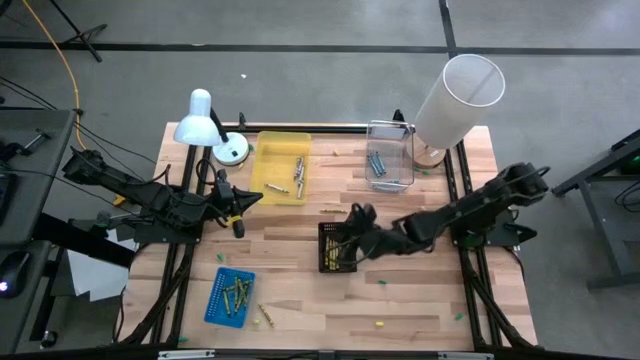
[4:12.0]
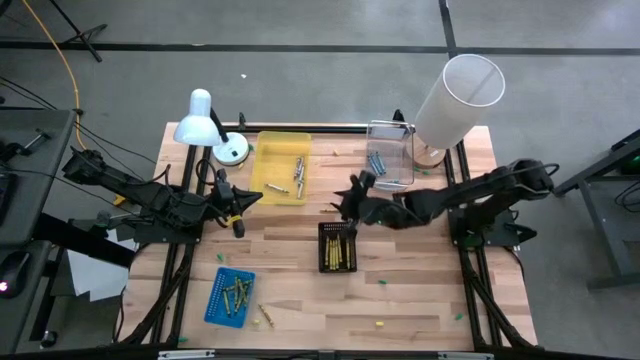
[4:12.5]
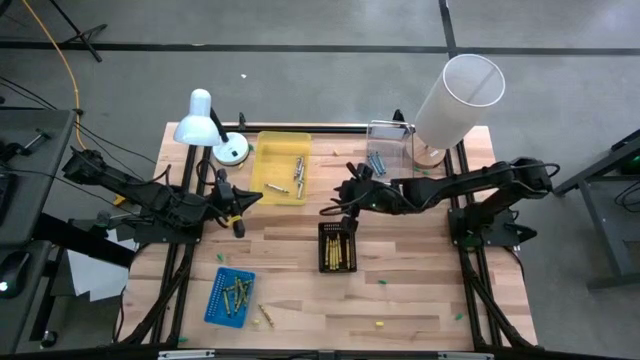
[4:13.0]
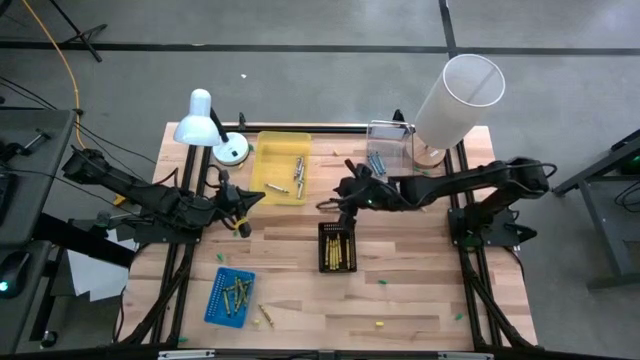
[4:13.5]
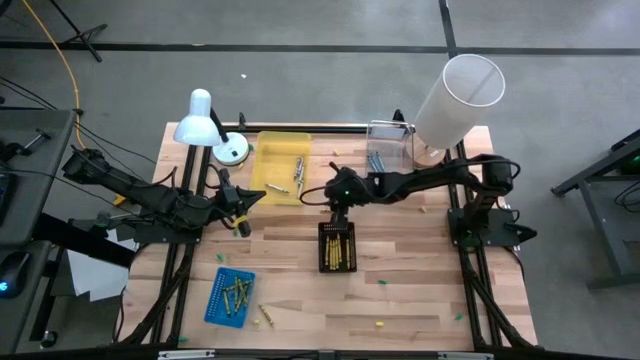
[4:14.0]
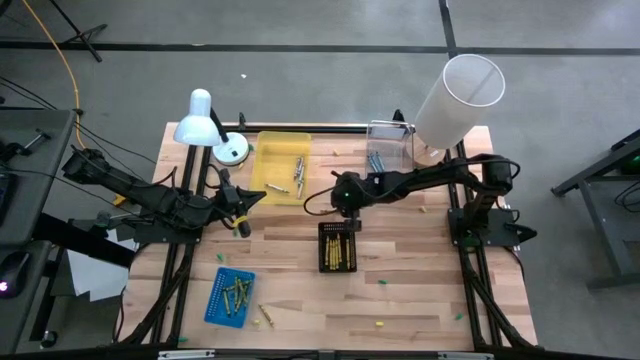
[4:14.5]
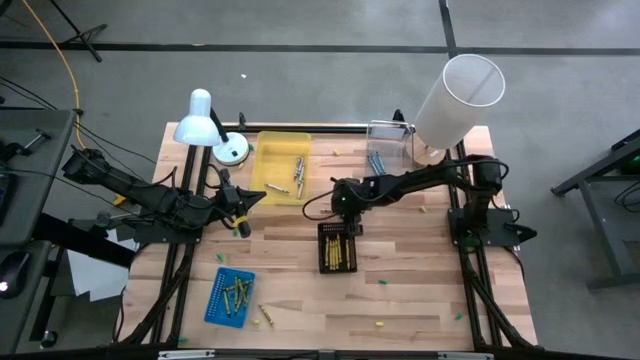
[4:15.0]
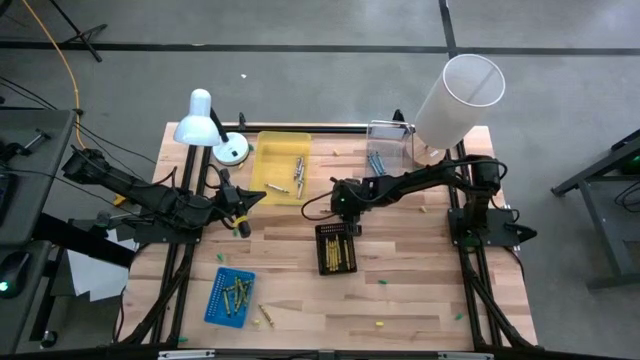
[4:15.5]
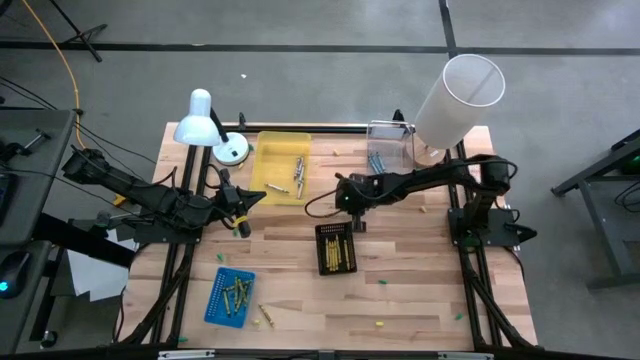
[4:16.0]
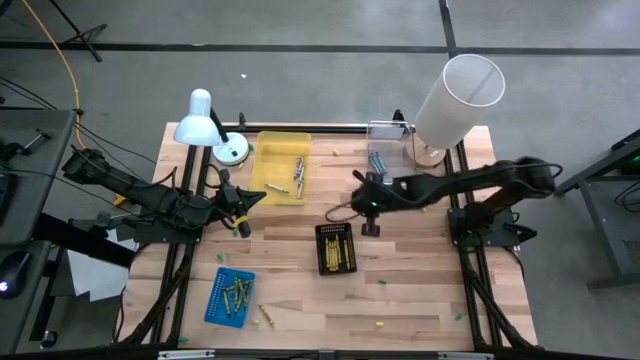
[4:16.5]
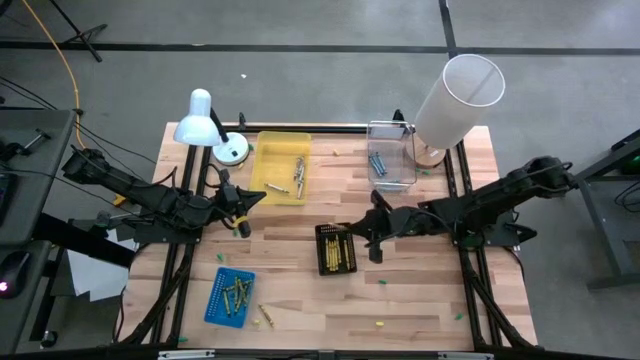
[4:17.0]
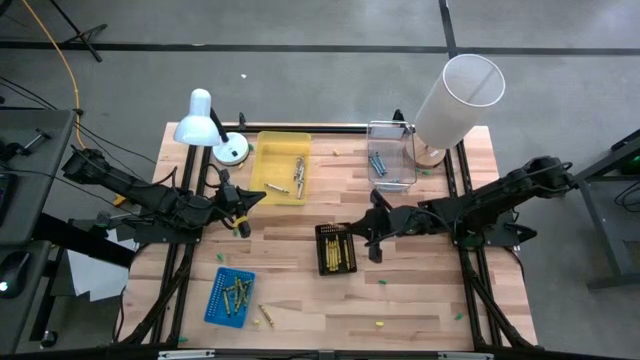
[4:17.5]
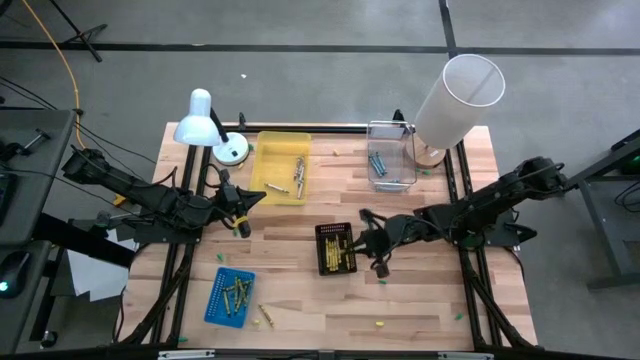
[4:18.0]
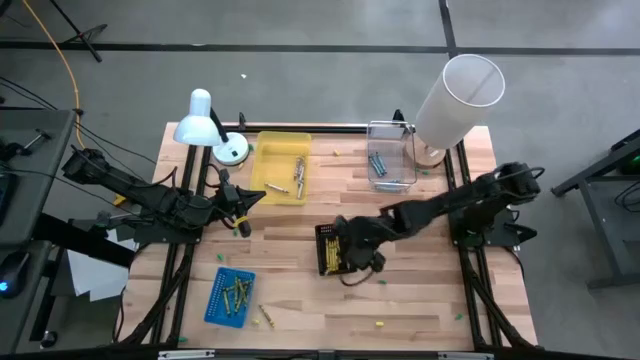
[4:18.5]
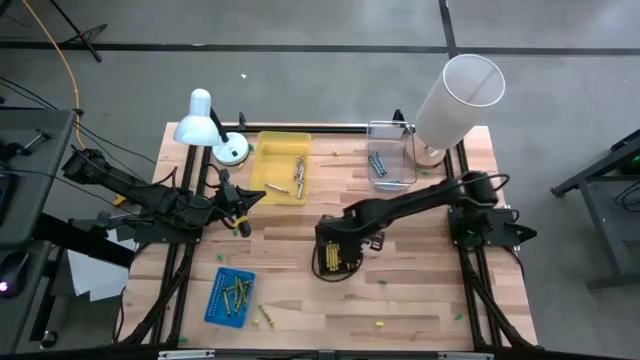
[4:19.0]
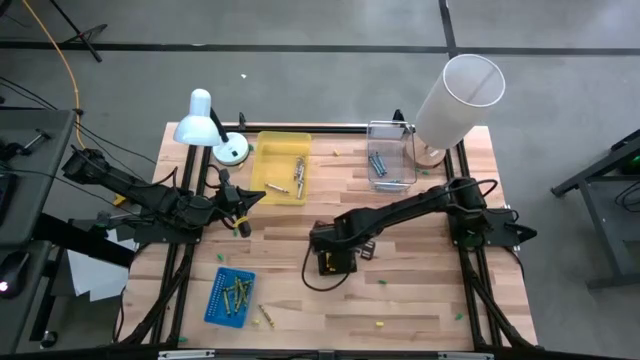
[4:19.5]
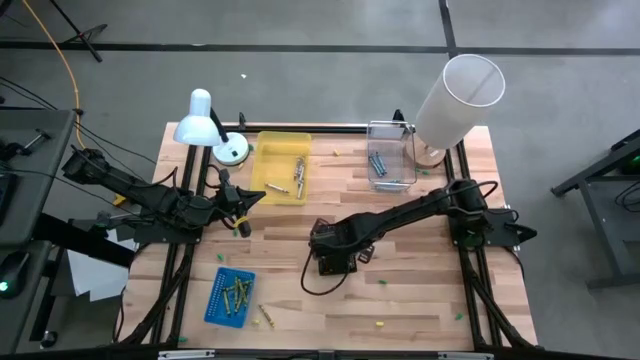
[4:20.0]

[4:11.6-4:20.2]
Task: Sort crayons
Put the yellow crayon into the black bin

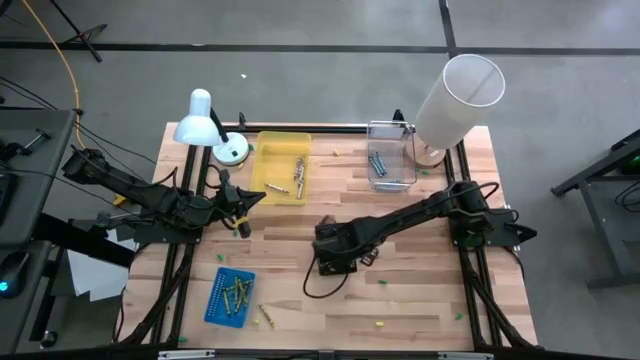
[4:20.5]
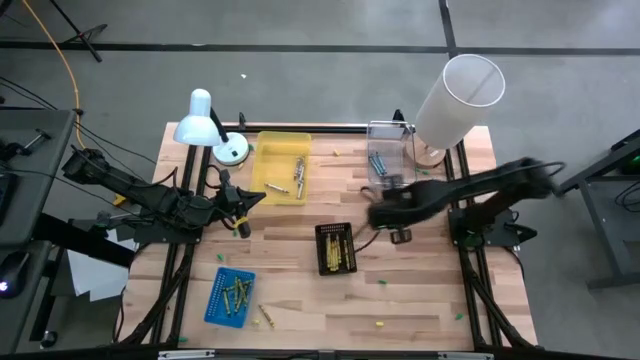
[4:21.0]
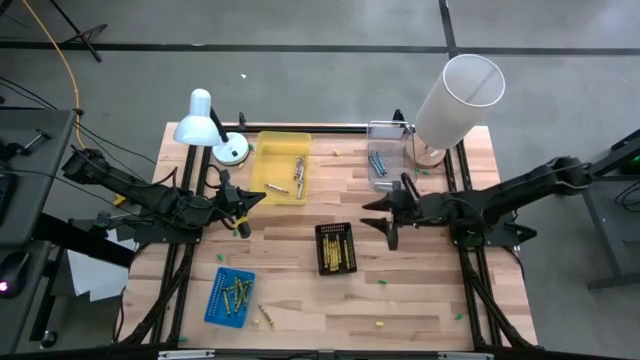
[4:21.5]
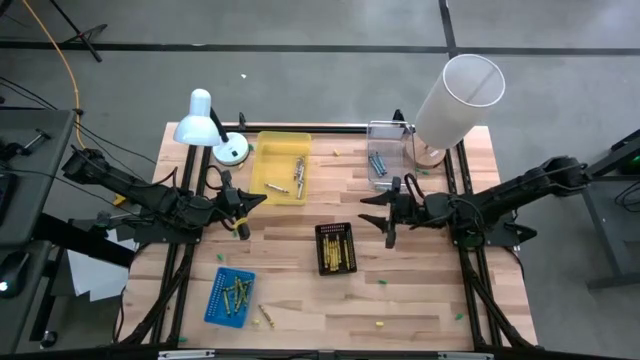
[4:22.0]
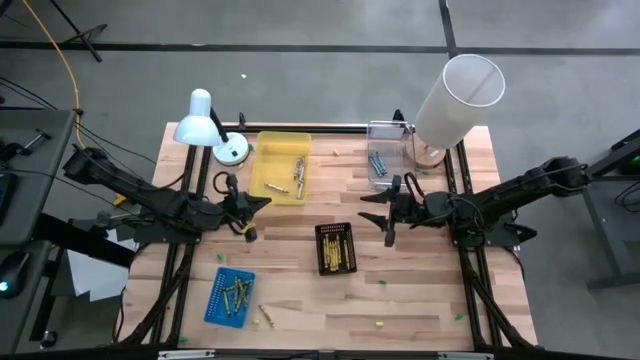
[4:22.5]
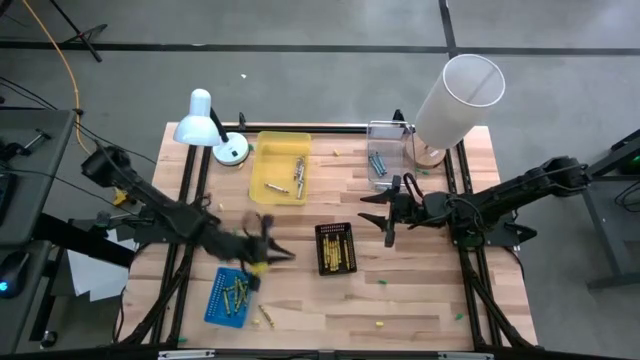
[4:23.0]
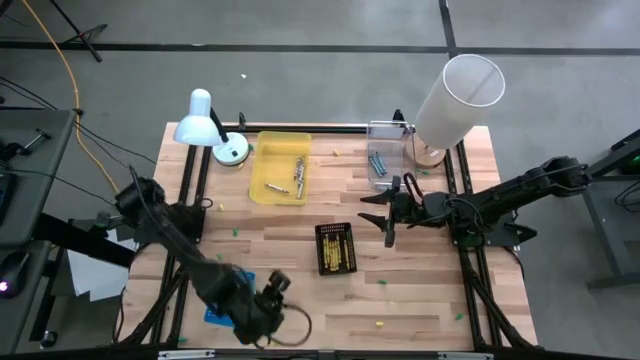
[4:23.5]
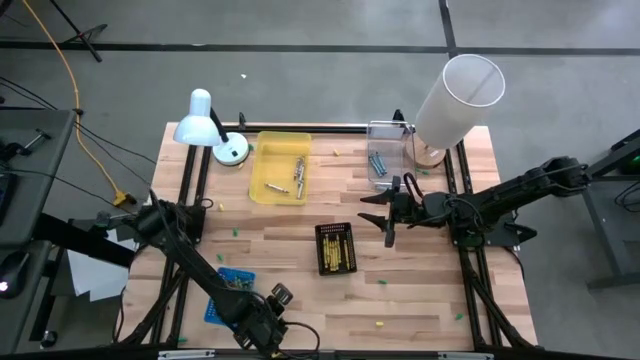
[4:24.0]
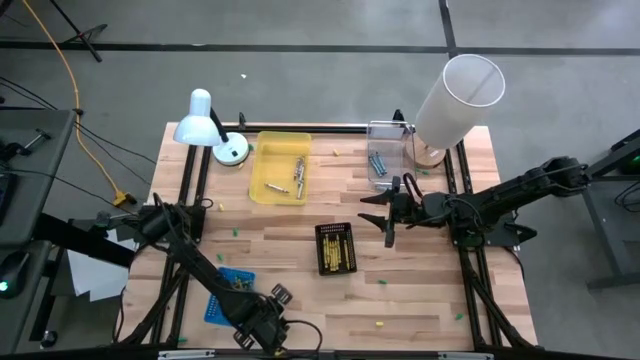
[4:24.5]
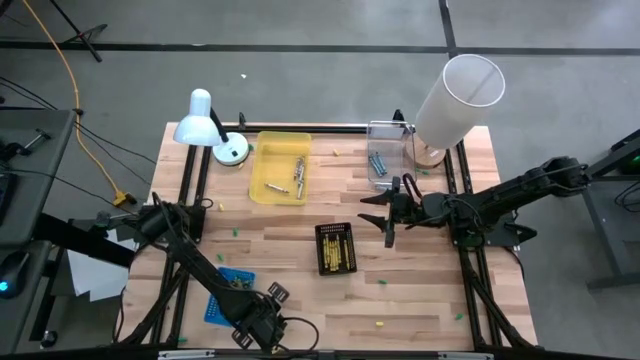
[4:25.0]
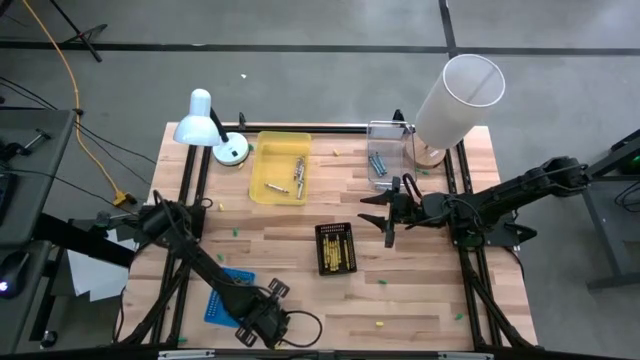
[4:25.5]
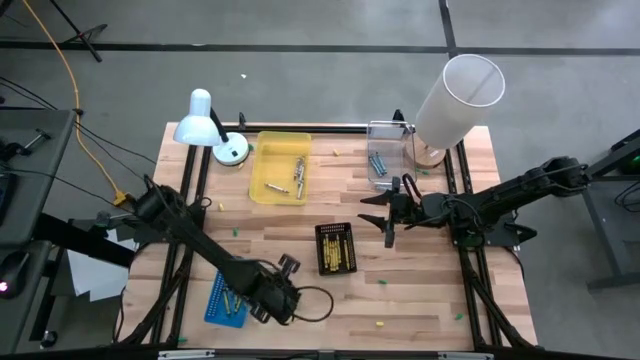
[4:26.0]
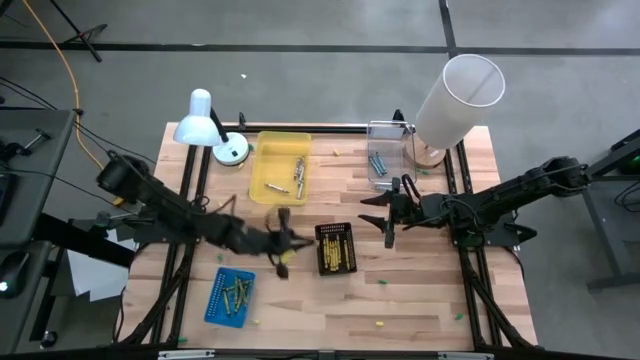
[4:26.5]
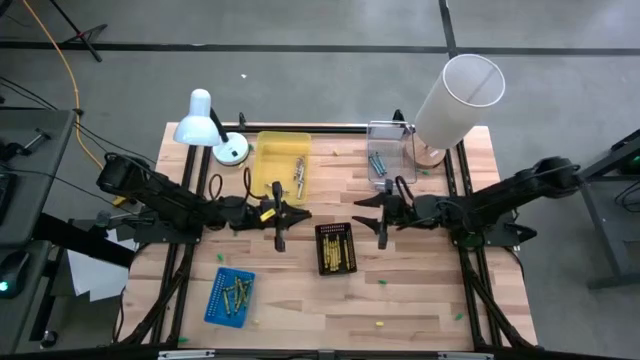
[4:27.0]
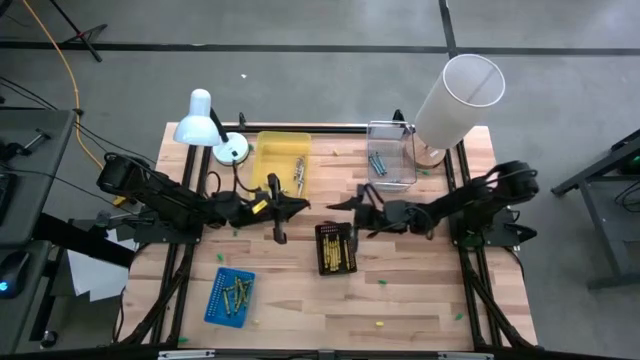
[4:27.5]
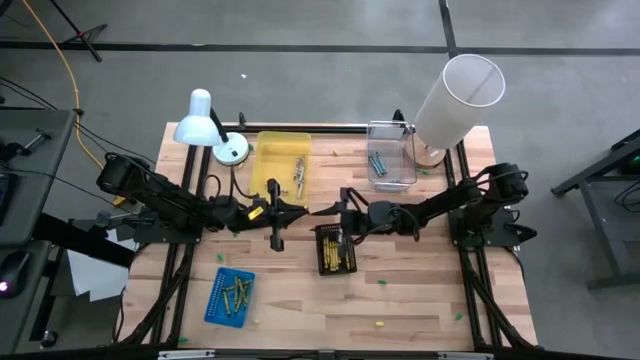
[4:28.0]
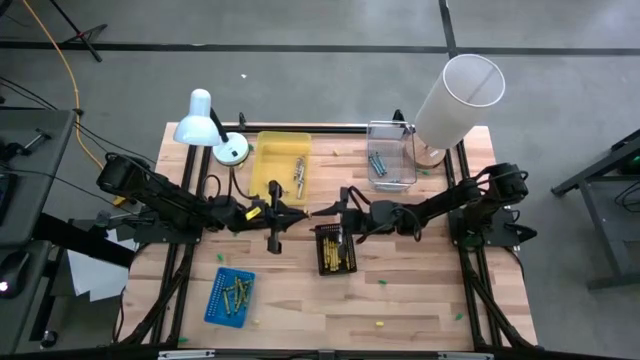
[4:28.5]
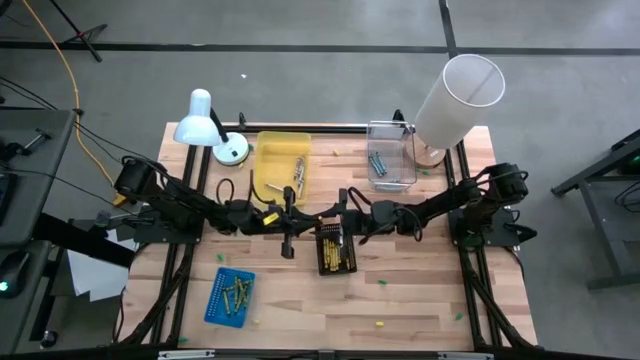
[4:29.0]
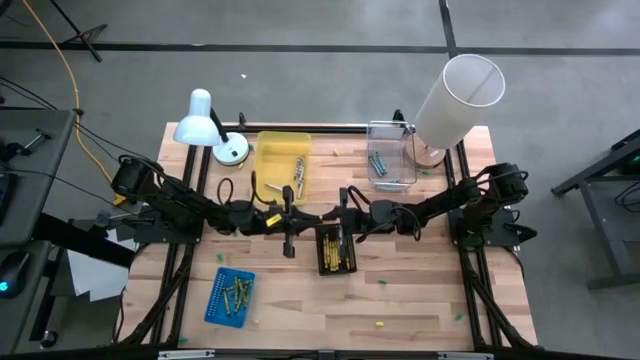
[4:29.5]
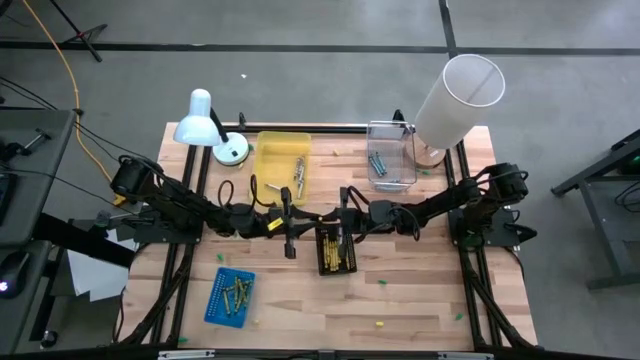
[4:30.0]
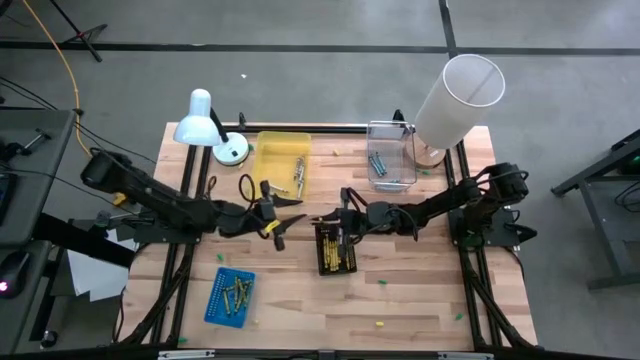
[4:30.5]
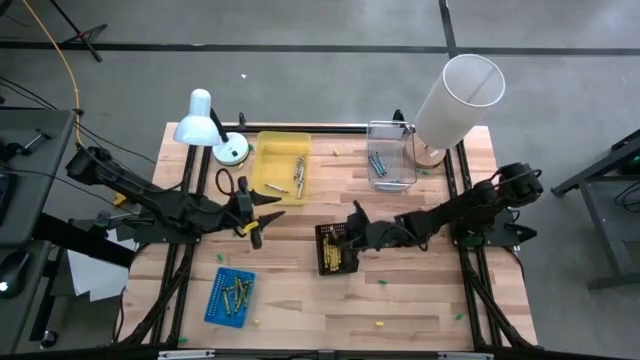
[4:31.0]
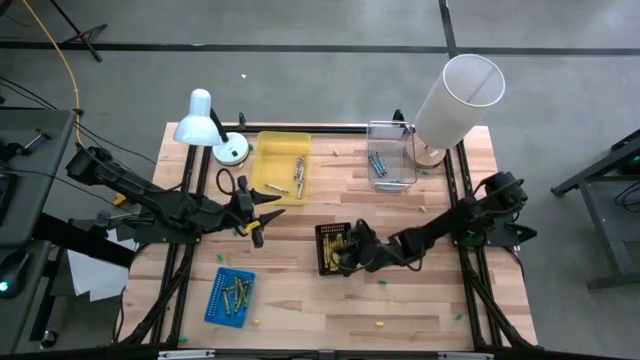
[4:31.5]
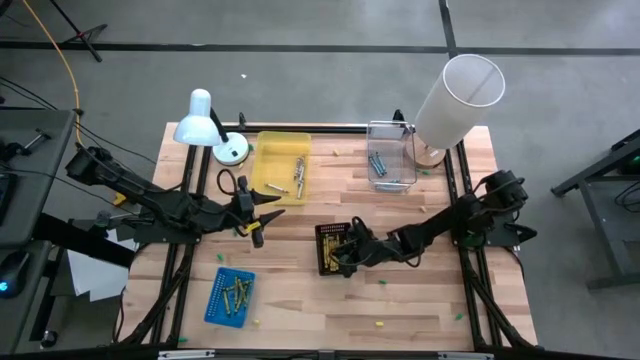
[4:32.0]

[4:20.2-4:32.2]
Put the yellow crayon into the black bin

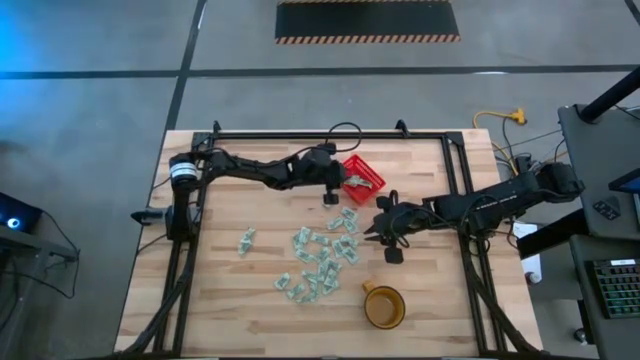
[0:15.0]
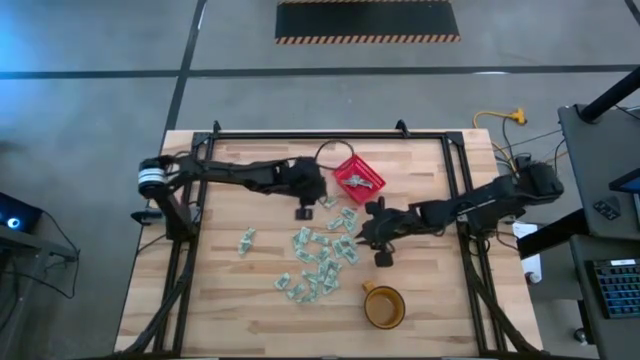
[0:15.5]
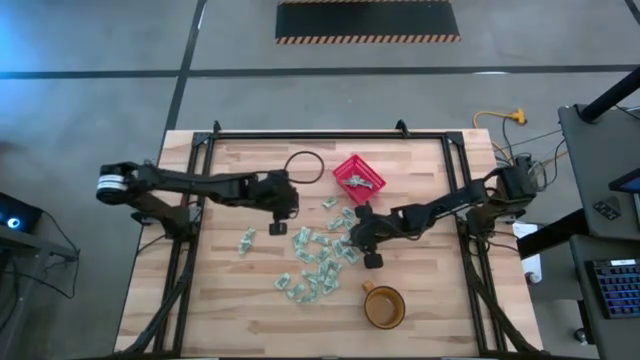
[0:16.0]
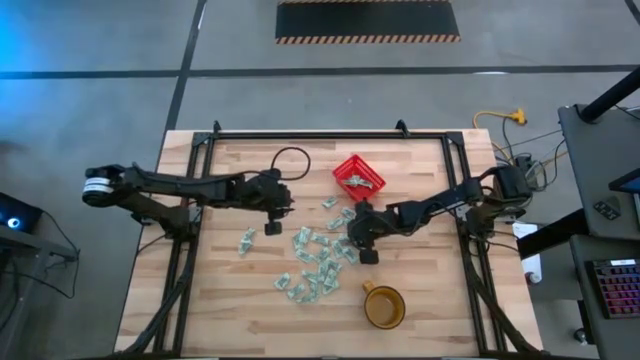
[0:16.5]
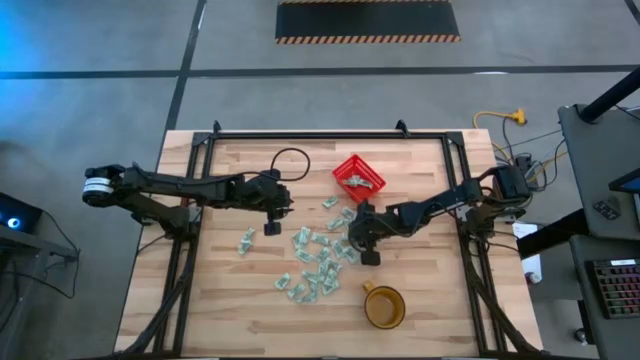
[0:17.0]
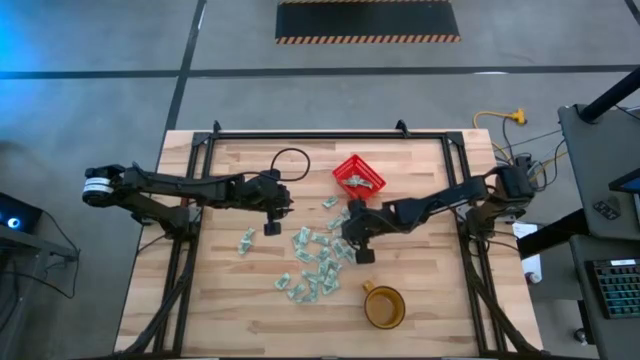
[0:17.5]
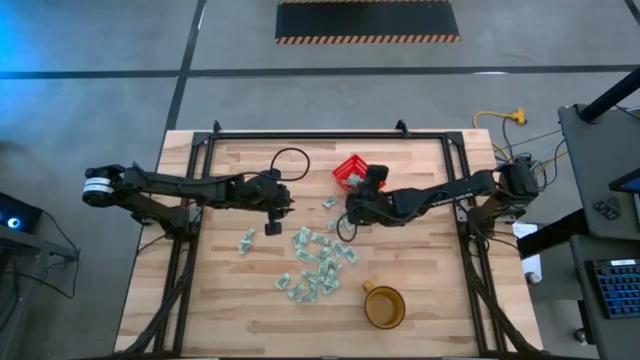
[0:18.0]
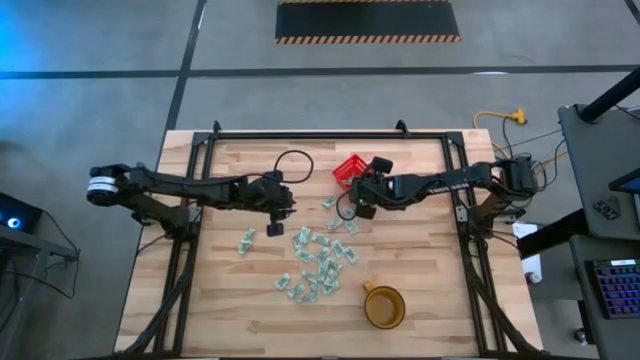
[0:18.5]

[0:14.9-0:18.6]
Task: Pick and place Stevia / Truvia into bins
Put the stevia packet into the red basket
